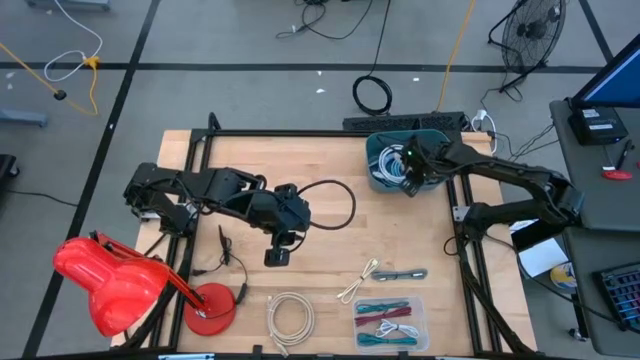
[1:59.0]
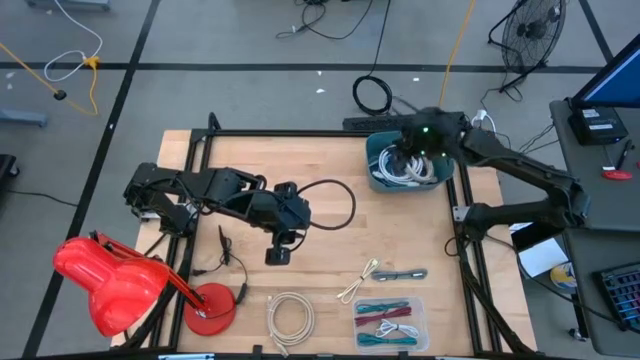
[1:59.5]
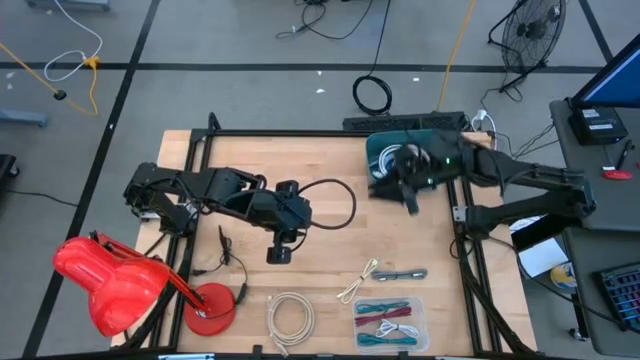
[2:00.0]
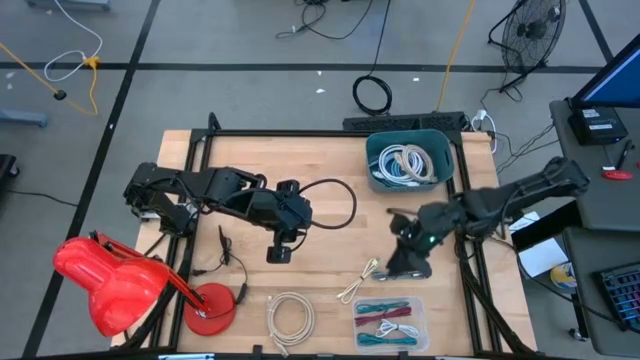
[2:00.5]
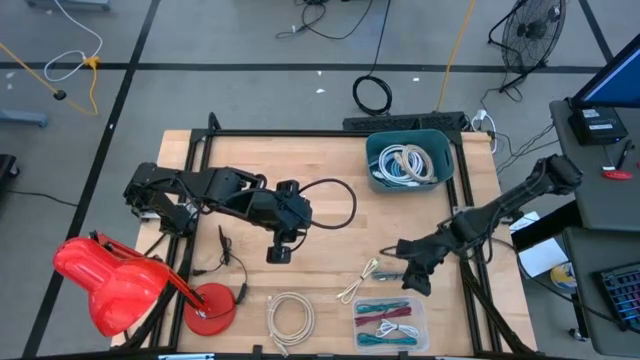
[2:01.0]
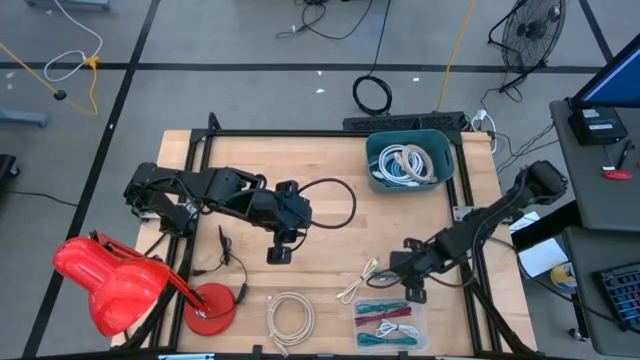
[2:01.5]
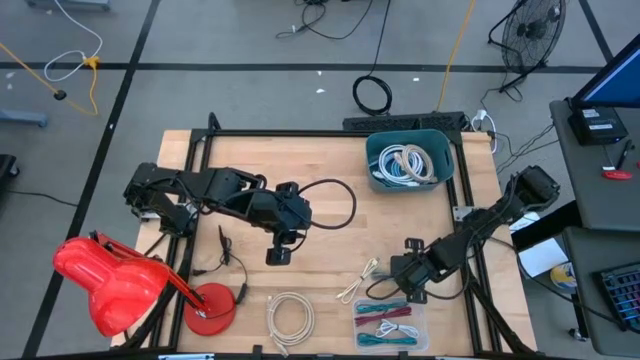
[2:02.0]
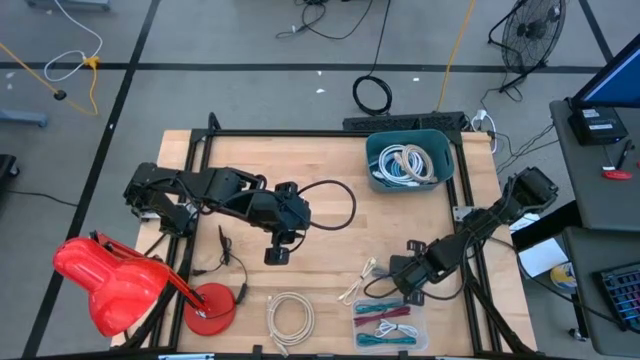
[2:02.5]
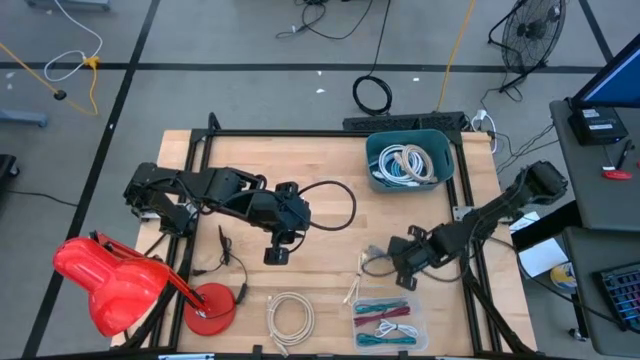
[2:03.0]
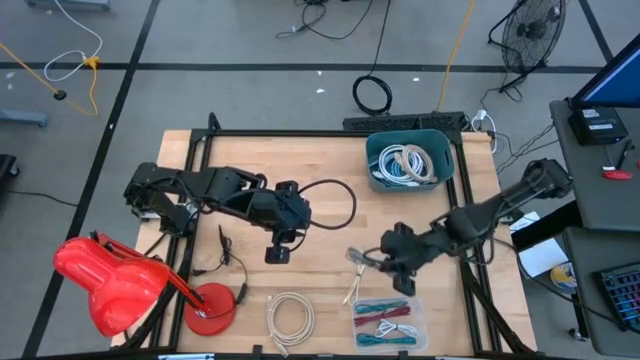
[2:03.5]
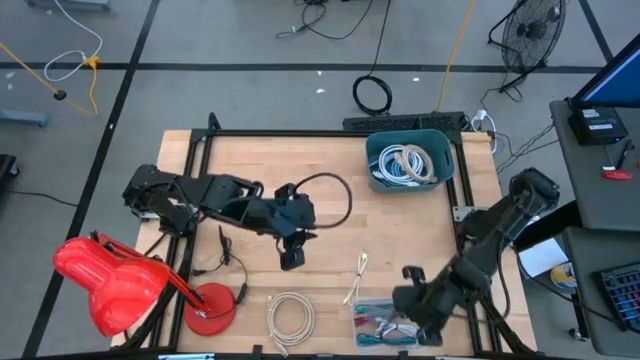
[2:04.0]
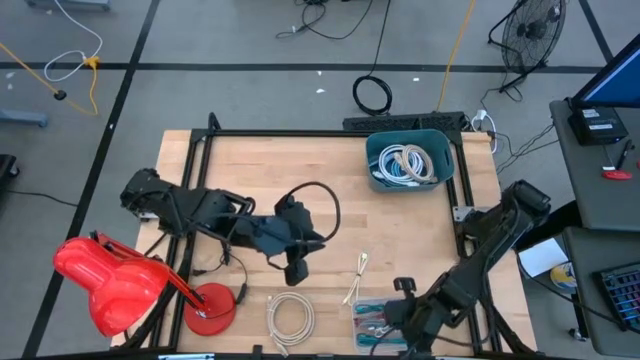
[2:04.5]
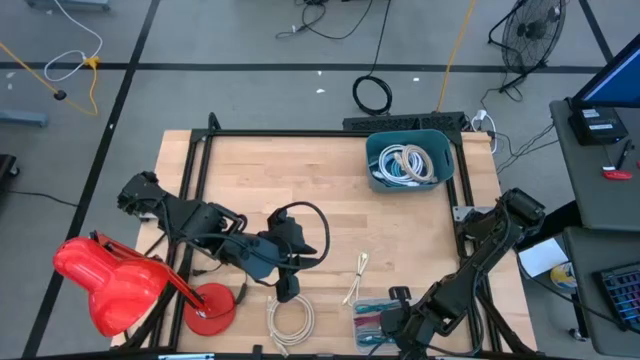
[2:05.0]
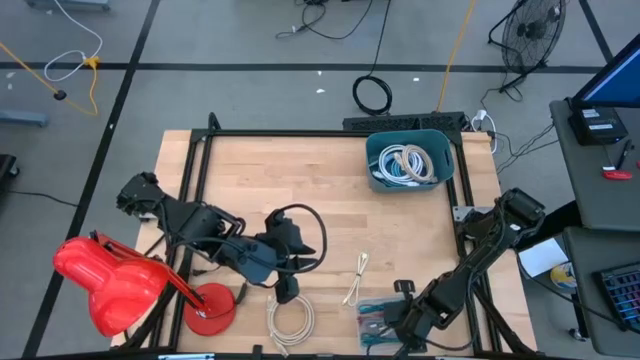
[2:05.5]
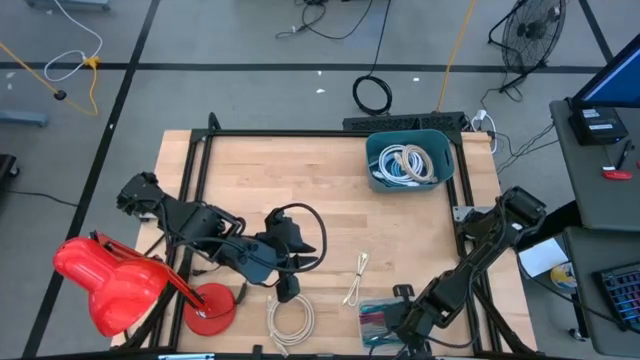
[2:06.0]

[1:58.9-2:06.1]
Task: Pick & Place USB Port
Put the black and white charger cable into the transparent bin

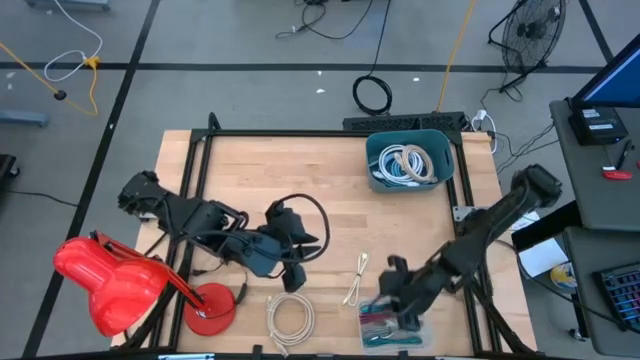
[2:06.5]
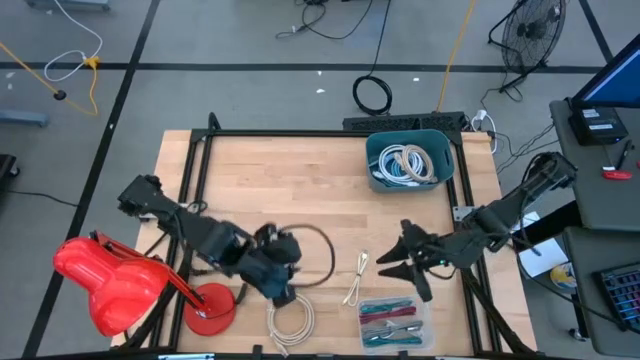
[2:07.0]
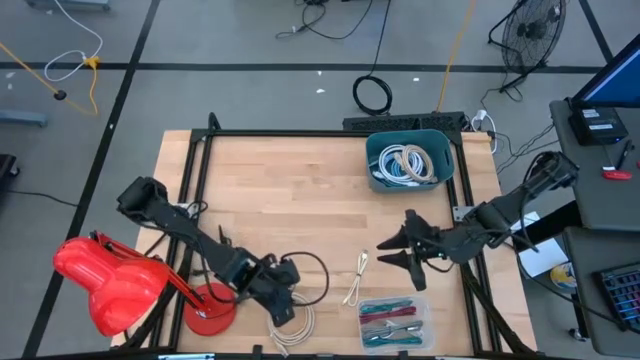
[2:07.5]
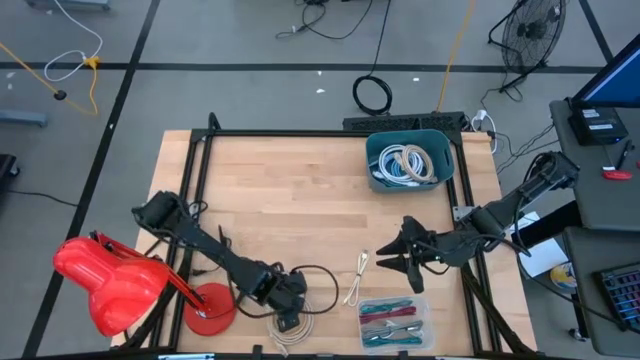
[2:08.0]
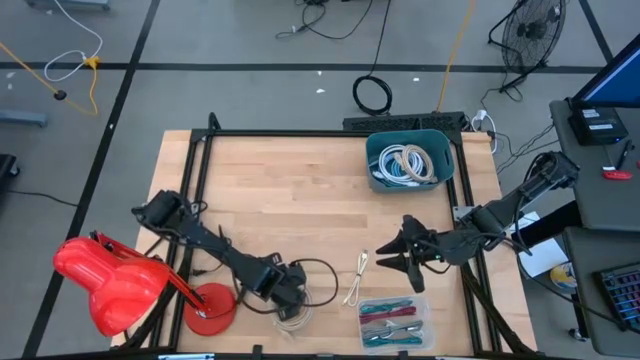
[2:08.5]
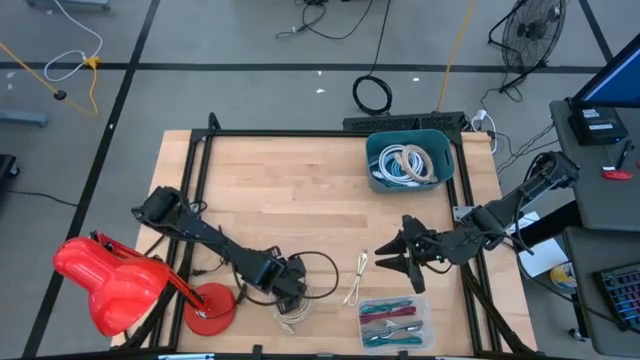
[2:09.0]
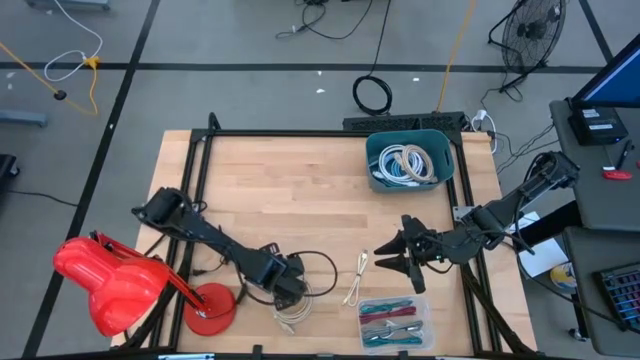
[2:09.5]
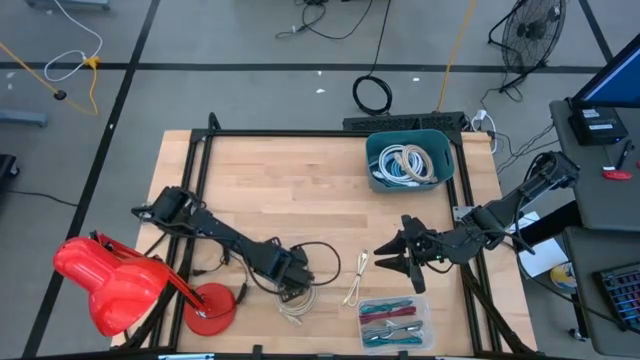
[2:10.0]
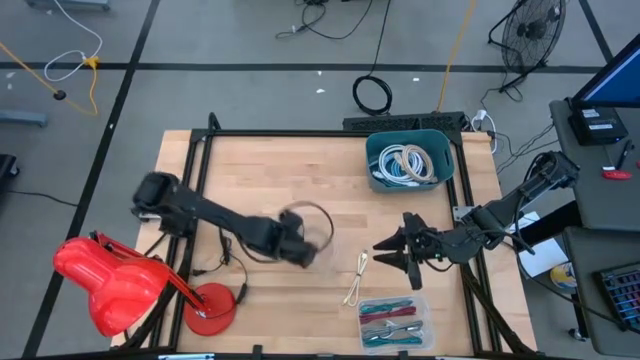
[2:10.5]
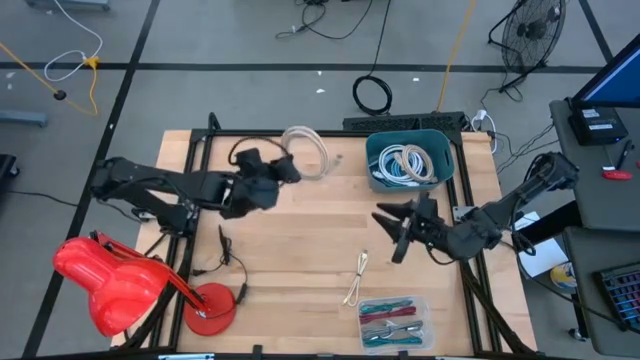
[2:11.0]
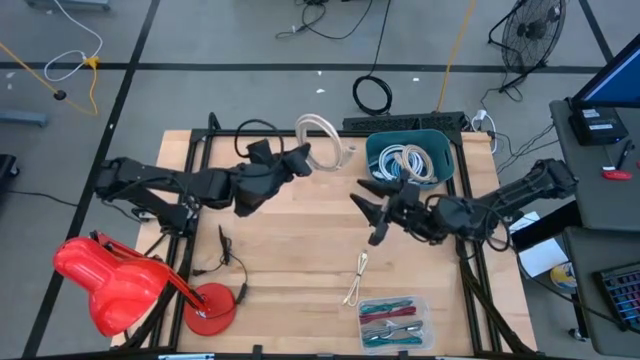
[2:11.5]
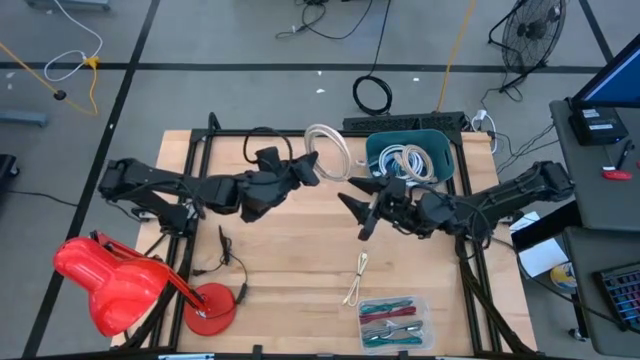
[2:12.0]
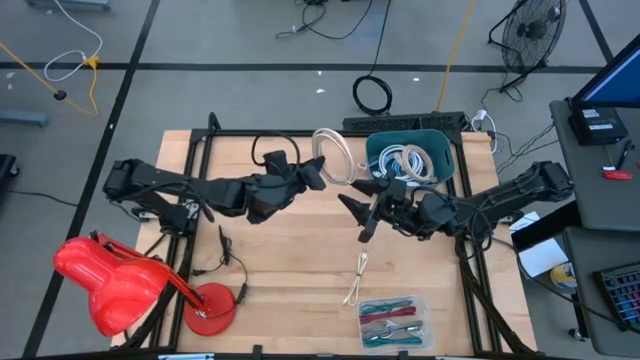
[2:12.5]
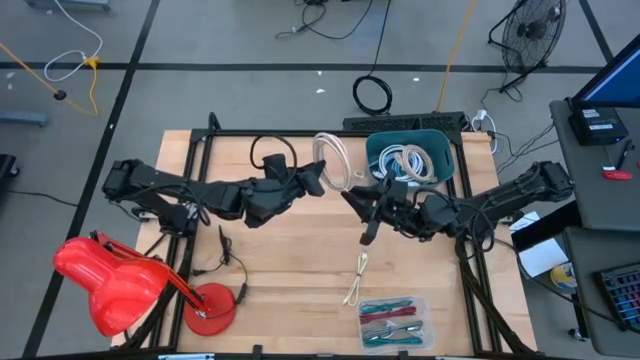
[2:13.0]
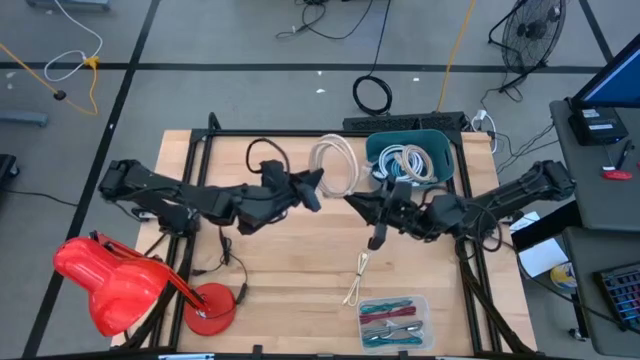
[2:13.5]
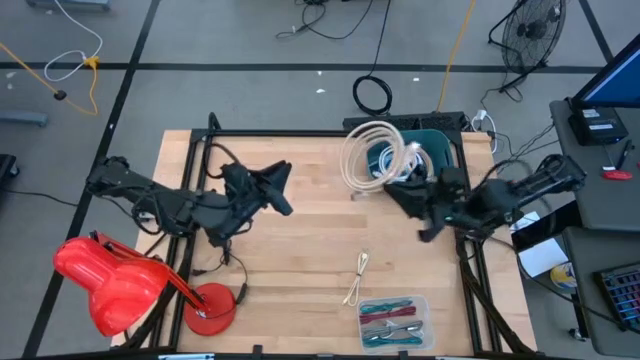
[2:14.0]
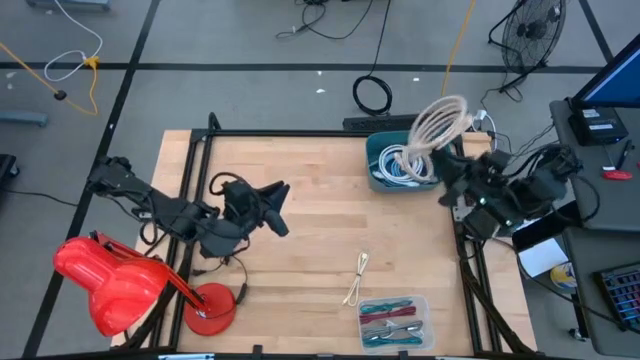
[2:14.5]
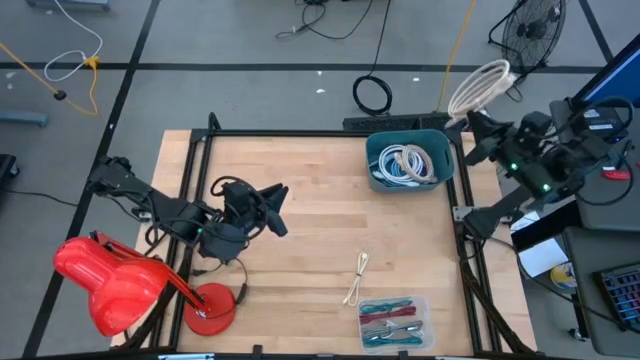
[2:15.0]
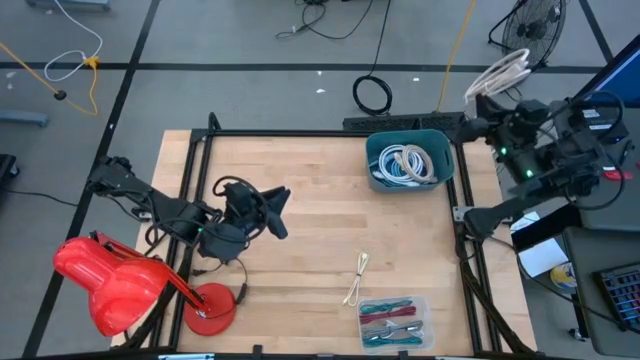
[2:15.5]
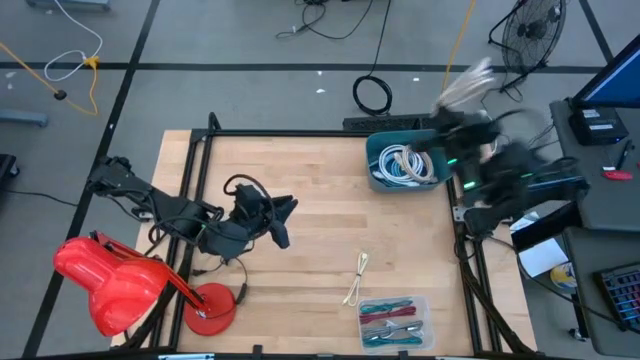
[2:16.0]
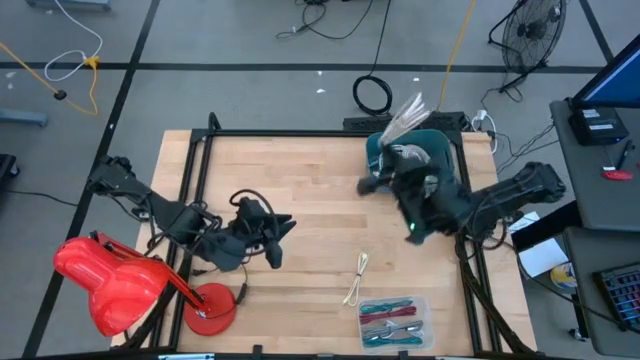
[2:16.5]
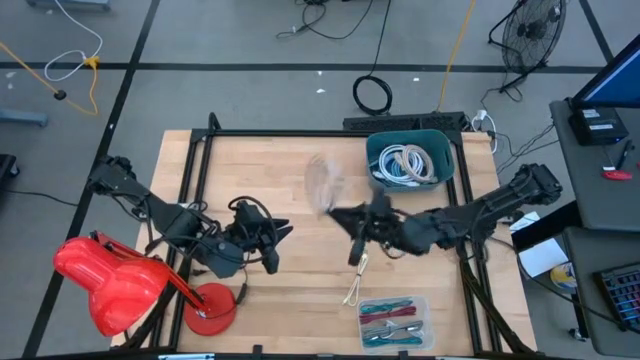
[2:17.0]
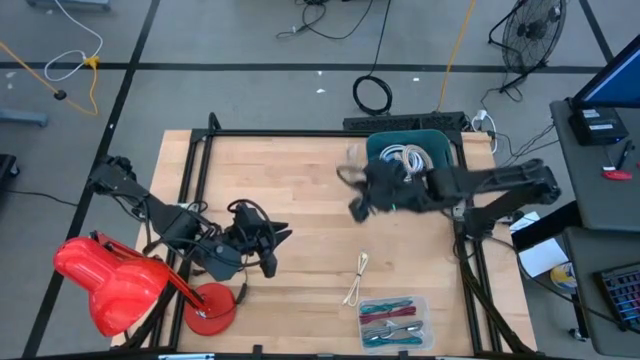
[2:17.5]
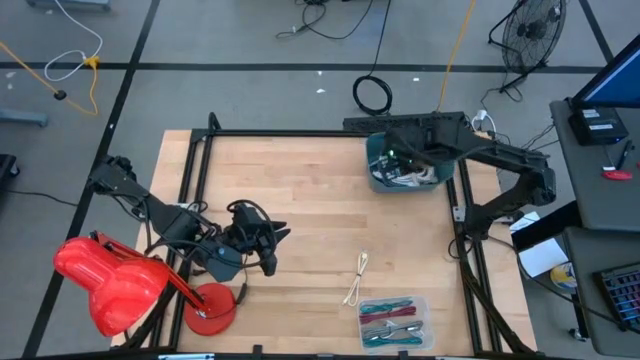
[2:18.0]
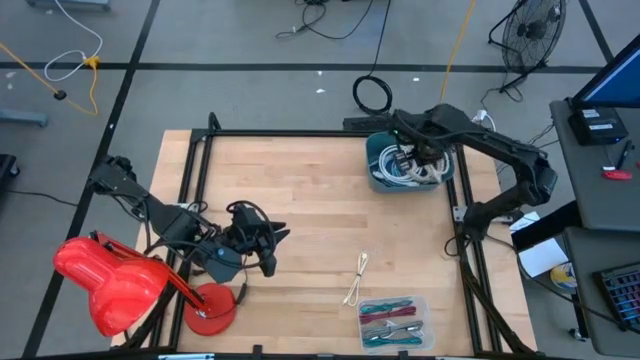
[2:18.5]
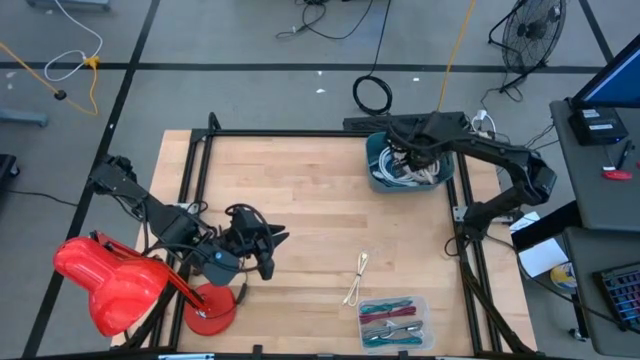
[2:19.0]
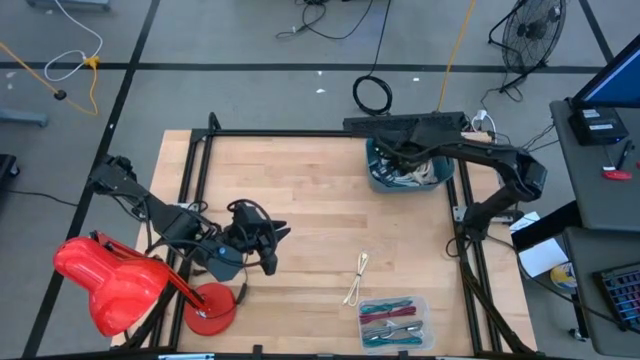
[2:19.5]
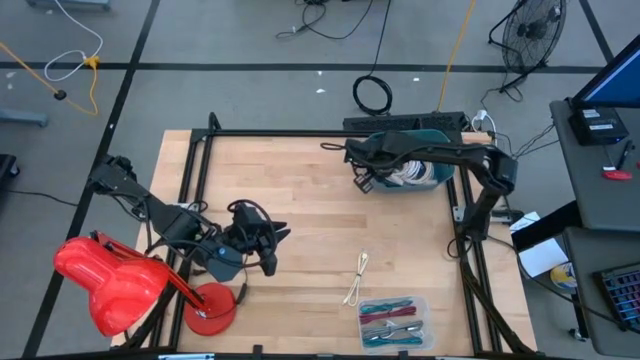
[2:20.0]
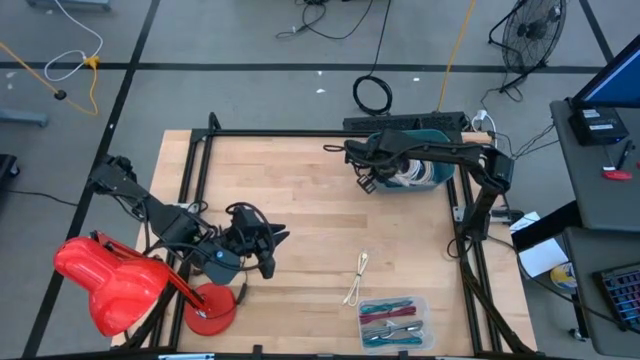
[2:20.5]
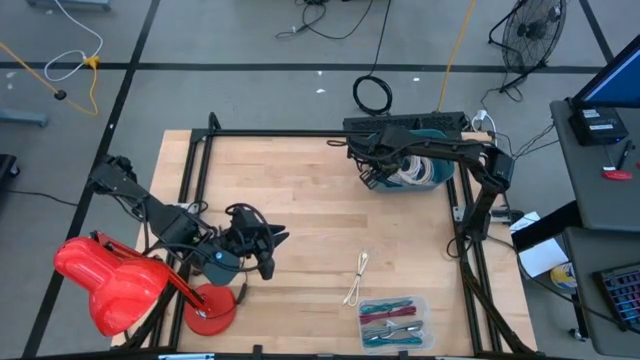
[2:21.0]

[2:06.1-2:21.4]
Put the brown HDMI cable into the blue bin
